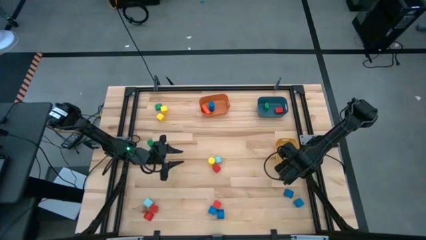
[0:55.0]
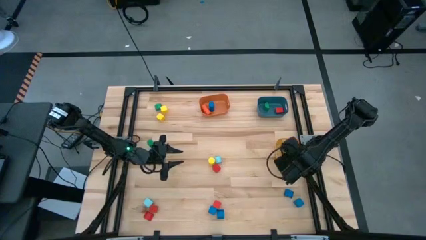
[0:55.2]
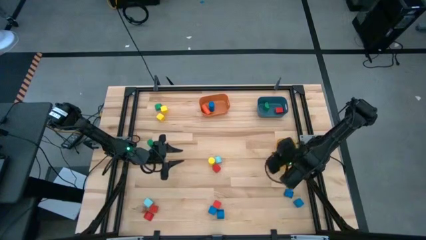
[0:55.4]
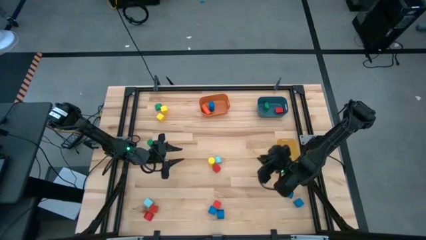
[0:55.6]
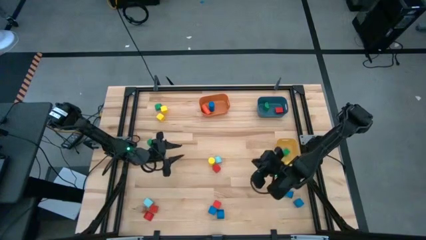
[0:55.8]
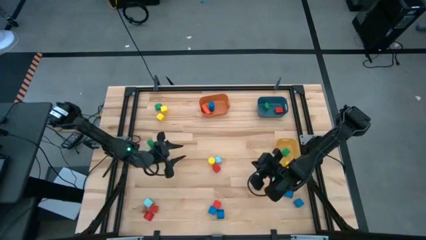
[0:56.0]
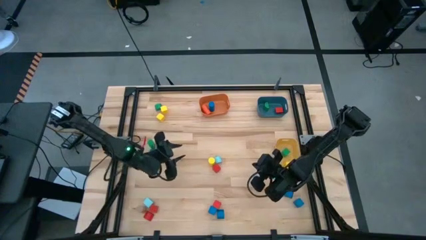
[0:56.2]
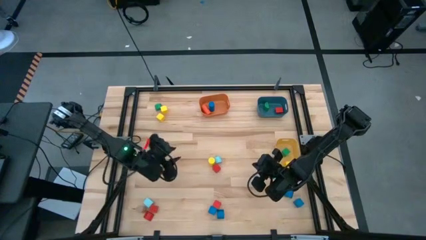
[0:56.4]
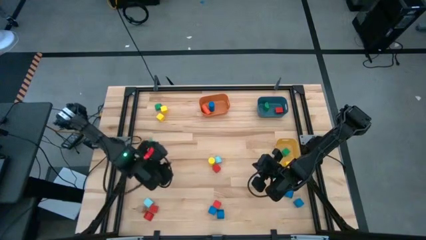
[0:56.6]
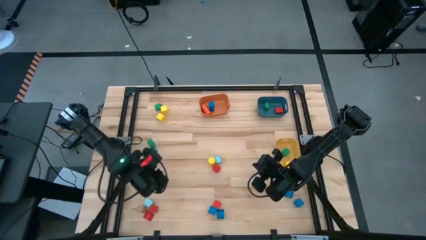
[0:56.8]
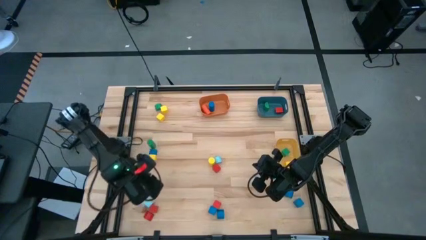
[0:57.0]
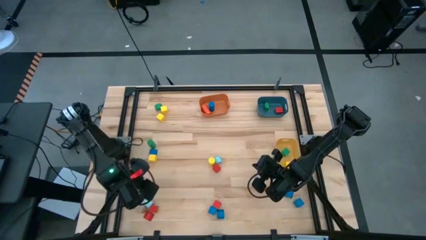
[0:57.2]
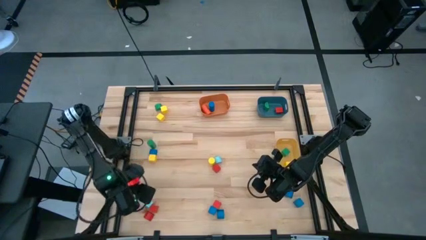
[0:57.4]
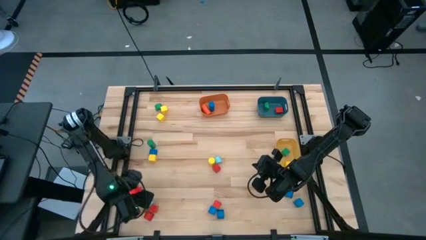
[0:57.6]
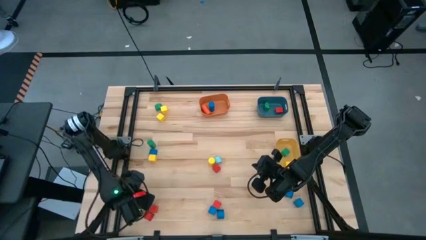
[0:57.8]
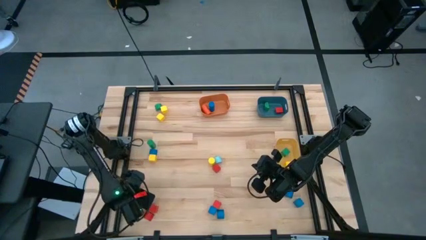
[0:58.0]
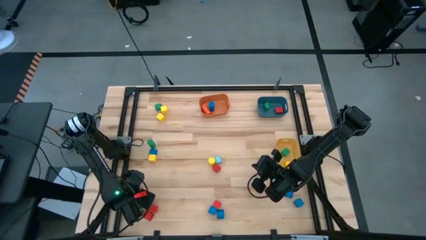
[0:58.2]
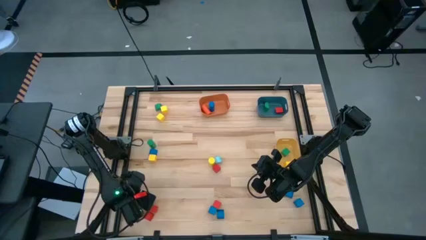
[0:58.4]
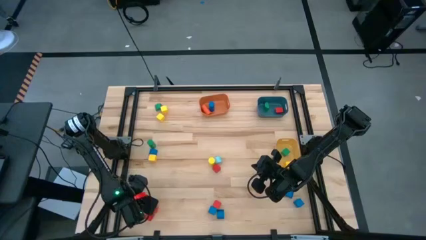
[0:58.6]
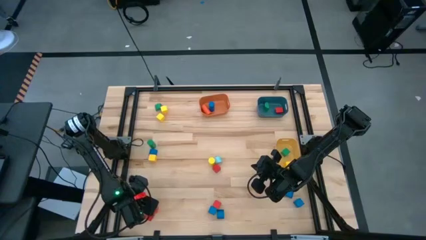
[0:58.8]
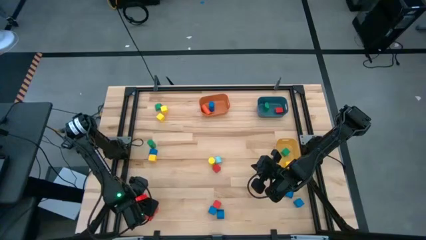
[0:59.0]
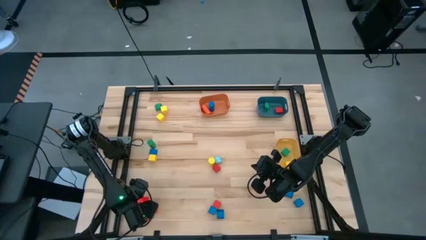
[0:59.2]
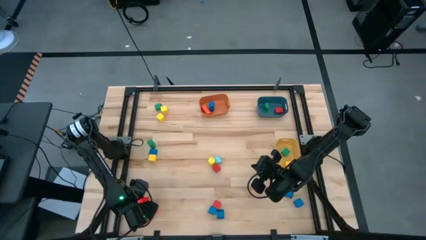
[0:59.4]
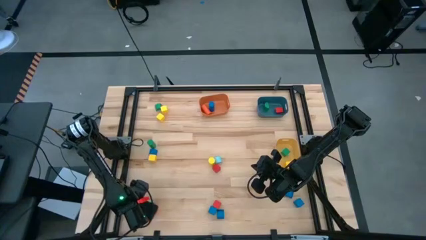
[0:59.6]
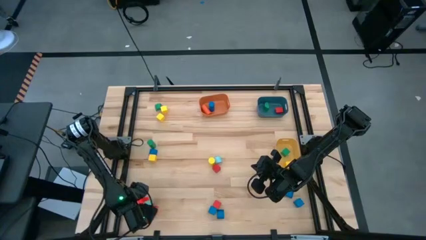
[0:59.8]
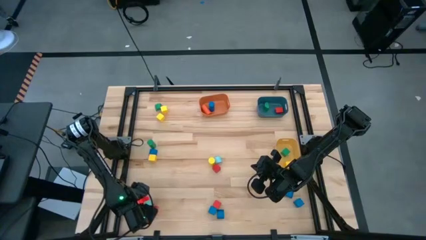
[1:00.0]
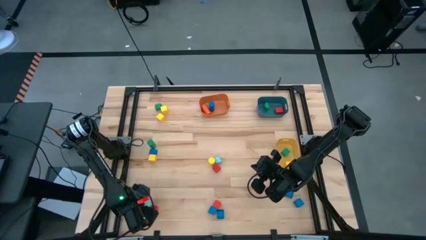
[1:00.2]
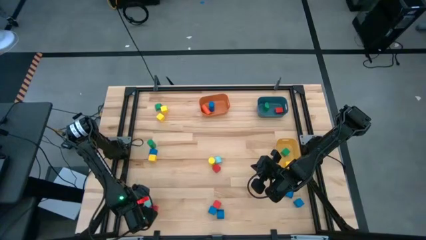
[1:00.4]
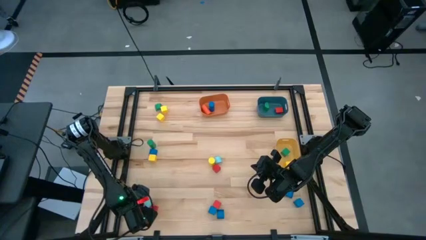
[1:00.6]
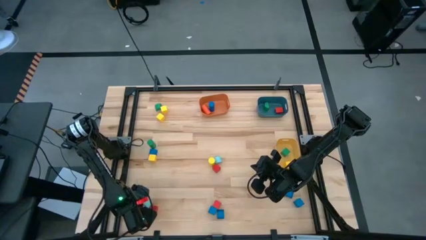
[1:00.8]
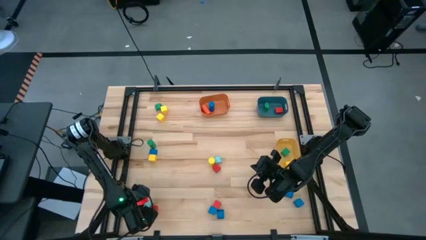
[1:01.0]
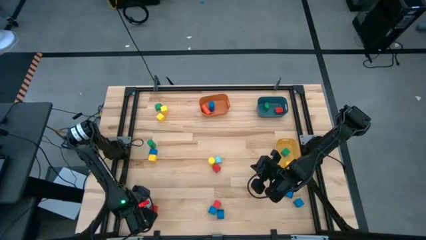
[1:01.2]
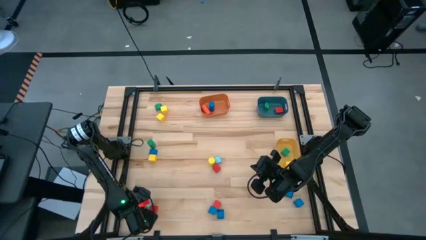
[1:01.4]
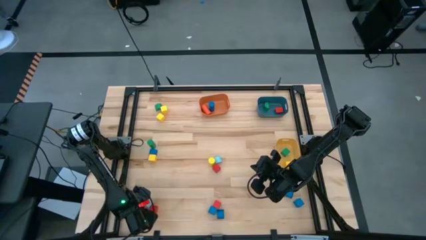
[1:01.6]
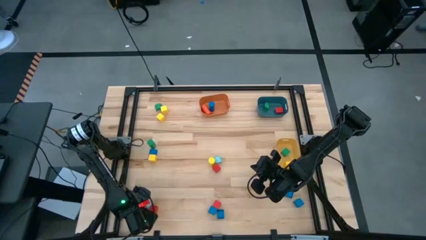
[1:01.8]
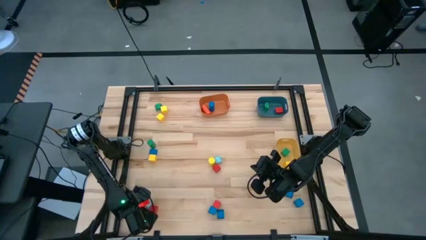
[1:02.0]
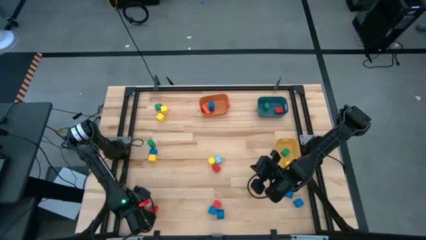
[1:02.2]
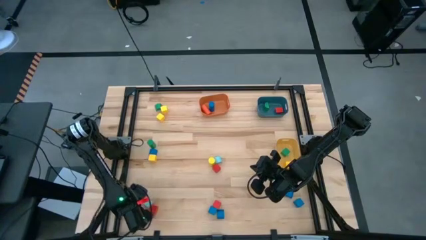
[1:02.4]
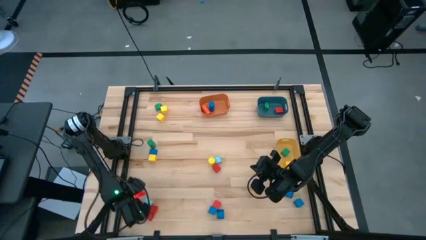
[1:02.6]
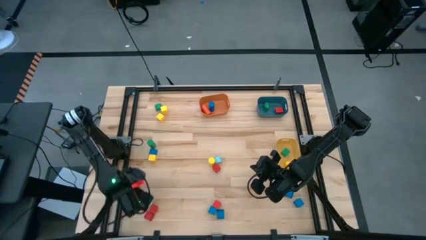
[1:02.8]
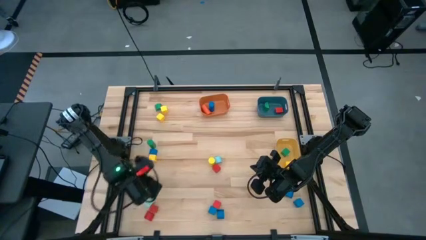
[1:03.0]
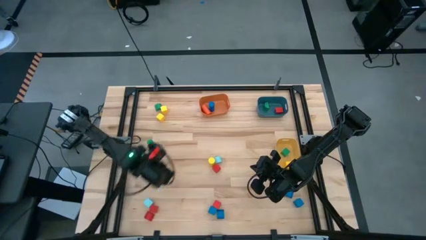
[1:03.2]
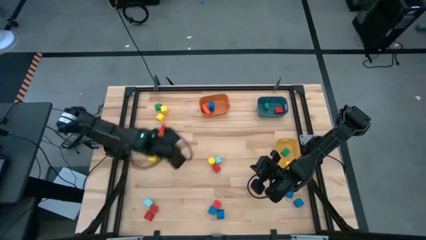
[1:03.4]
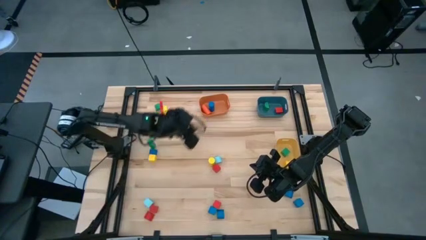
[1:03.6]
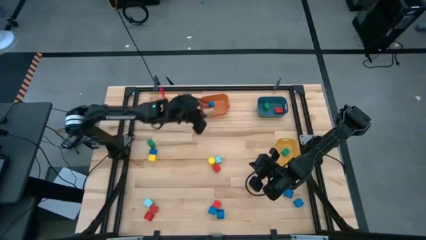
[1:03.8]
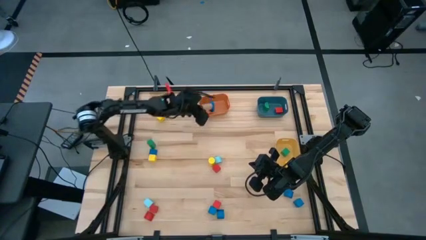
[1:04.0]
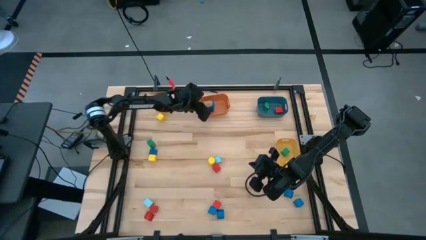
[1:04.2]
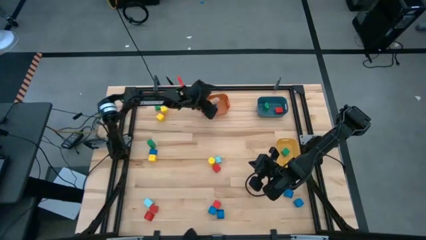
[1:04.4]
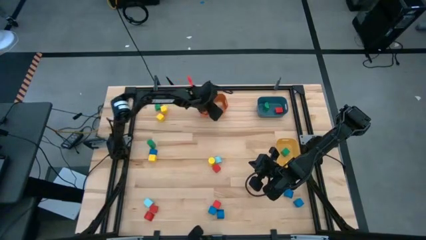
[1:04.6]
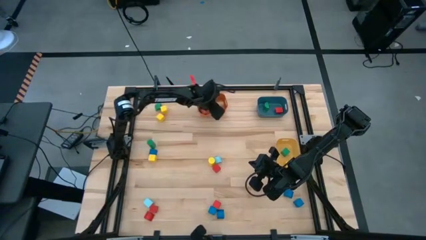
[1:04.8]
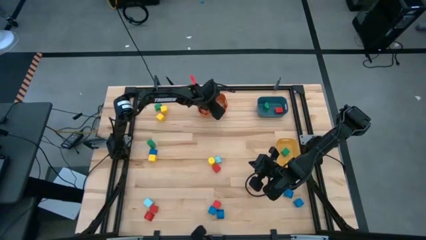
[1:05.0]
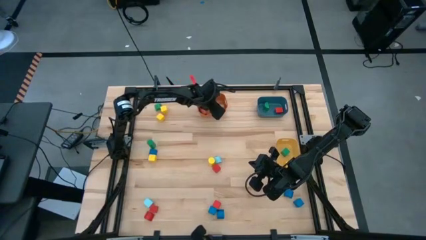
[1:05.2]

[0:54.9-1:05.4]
Task: Sort blocks by size
Put the brown cylinder block into the orange bin

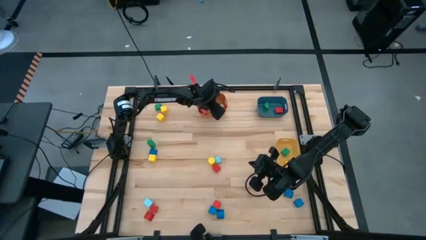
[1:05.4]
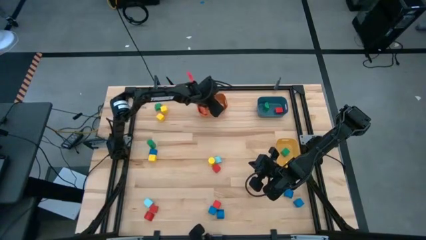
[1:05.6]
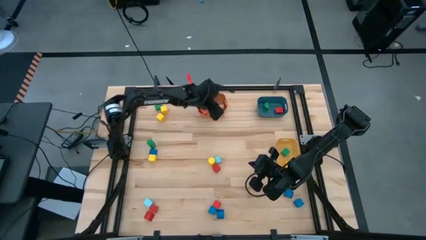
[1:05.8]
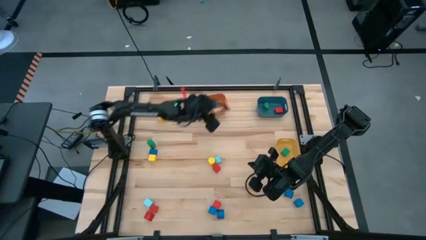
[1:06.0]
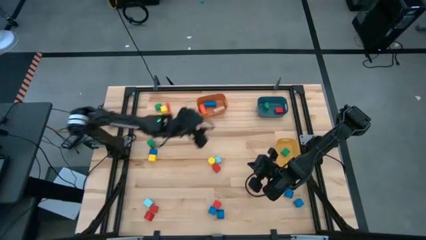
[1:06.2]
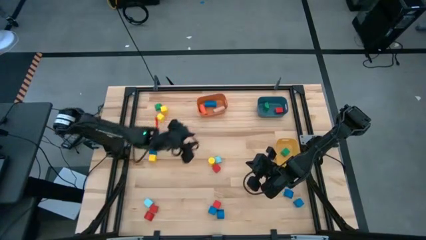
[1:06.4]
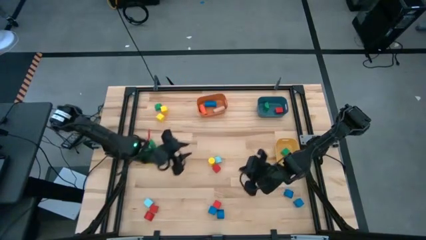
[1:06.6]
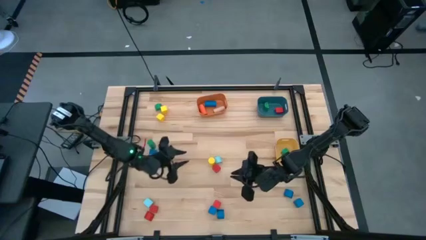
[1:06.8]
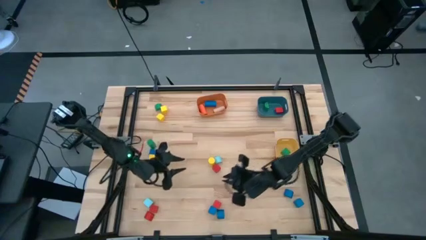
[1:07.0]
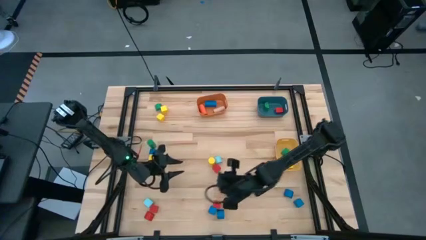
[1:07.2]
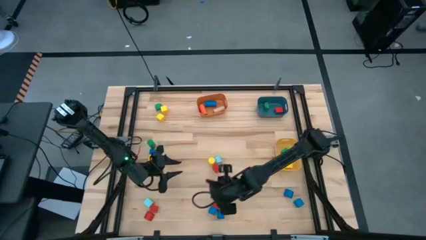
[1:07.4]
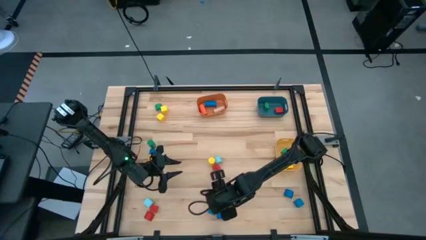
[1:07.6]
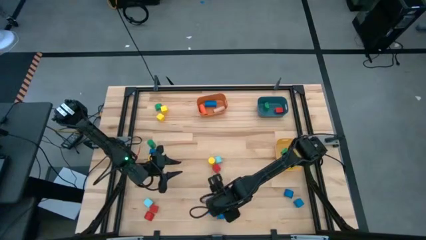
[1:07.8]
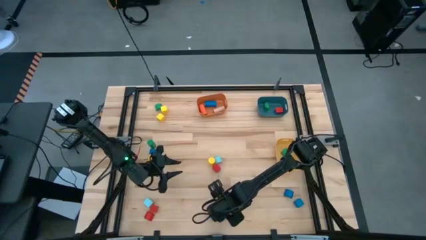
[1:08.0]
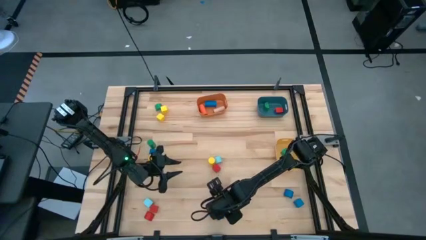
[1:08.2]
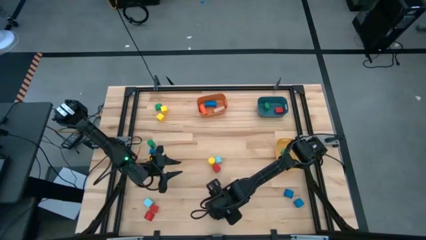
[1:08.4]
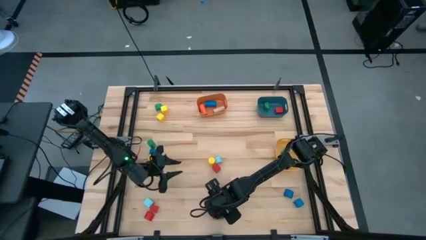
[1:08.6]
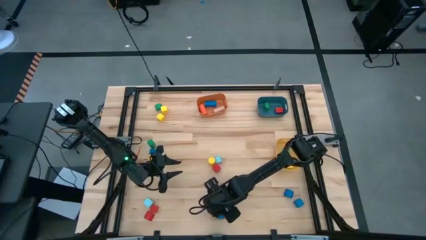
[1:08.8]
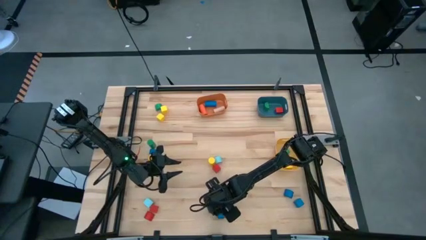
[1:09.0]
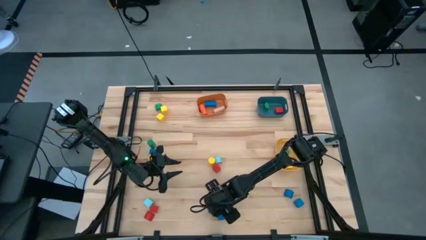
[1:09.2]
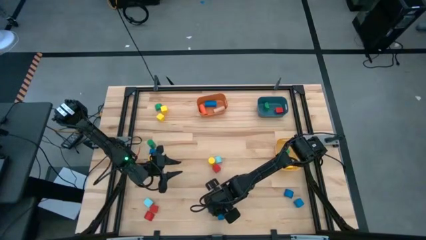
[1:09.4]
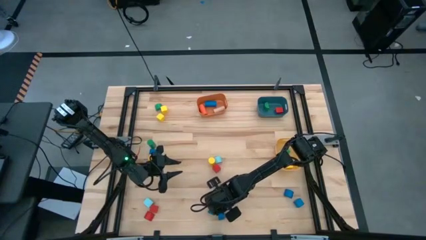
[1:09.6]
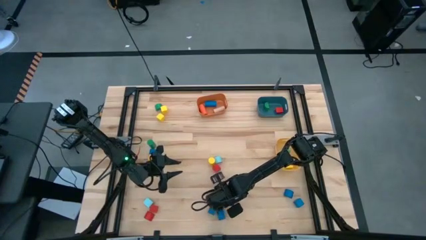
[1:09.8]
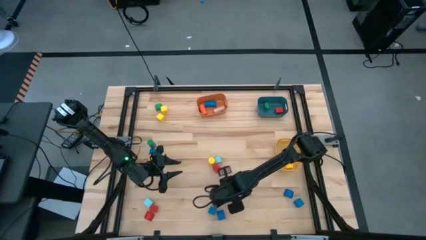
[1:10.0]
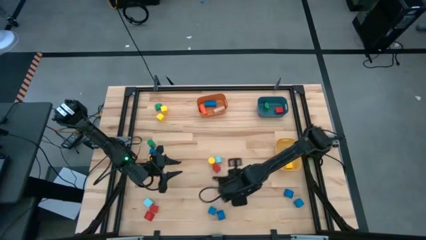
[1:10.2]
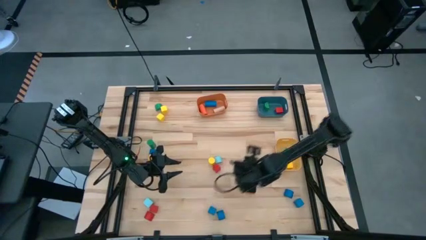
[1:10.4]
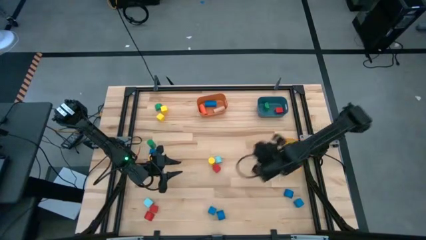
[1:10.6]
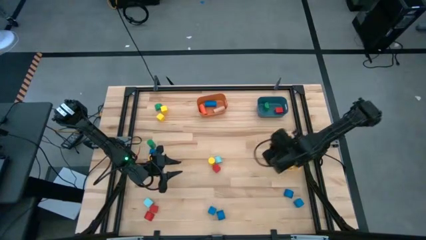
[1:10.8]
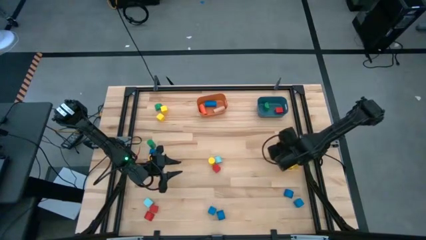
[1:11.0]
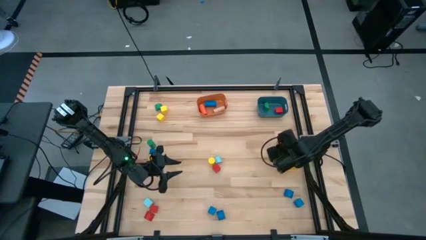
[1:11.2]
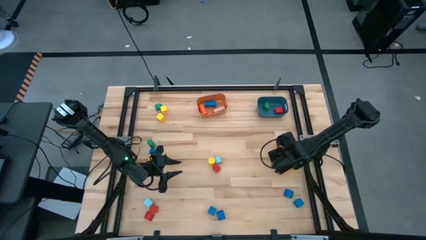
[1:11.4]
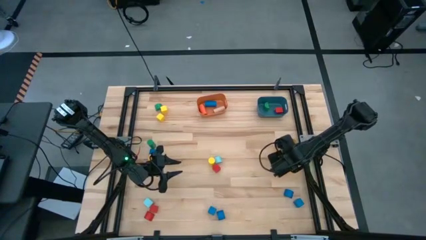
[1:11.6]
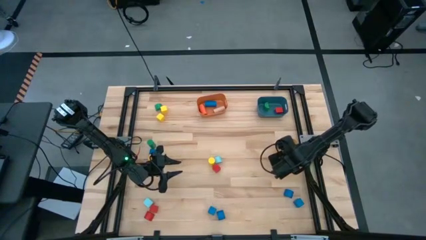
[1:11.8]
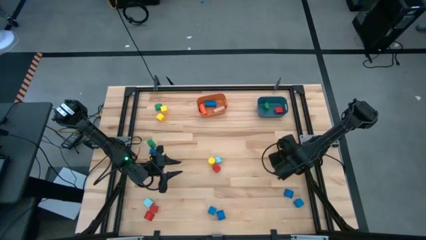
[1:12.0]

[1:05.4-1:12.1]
Put the red cube block into the yellow bin
